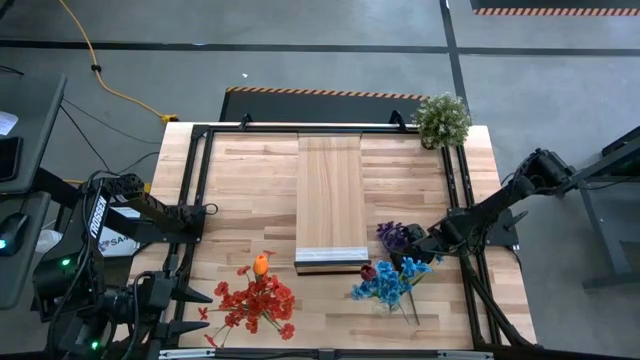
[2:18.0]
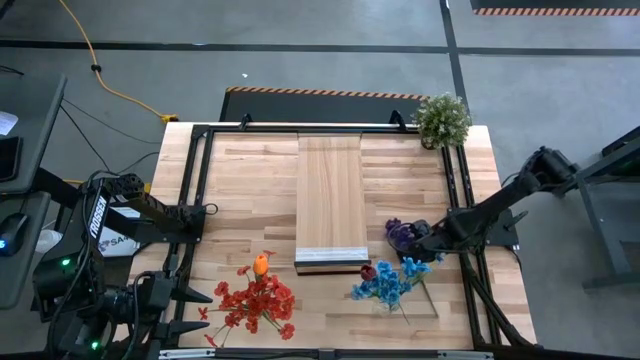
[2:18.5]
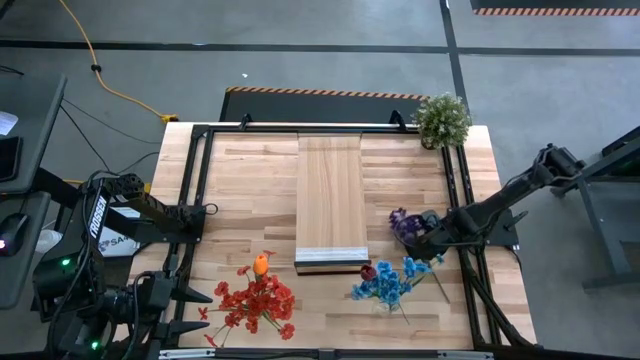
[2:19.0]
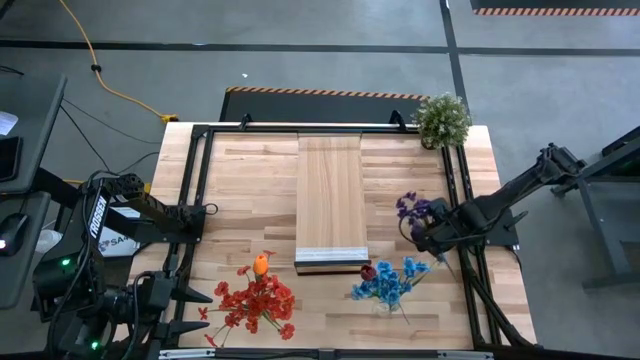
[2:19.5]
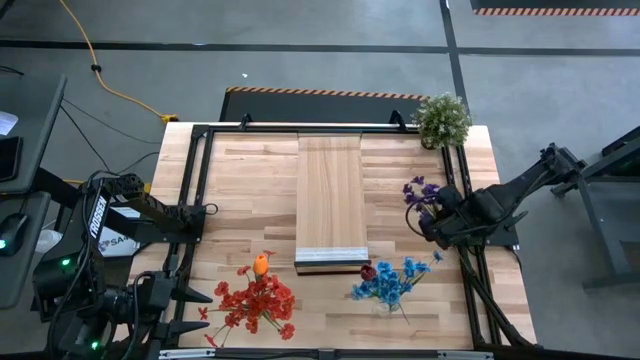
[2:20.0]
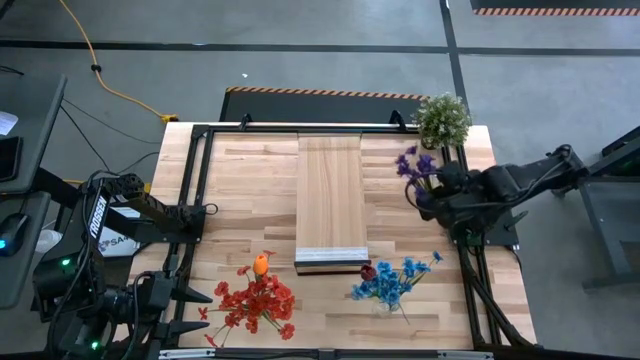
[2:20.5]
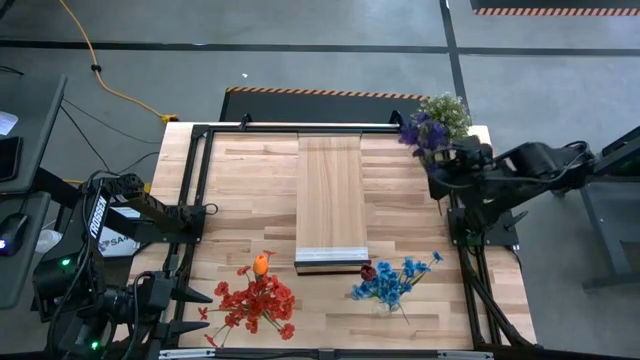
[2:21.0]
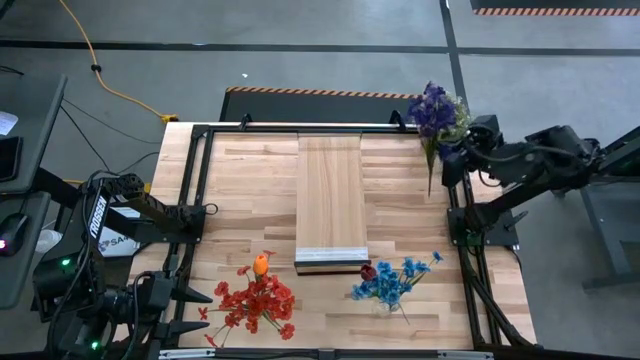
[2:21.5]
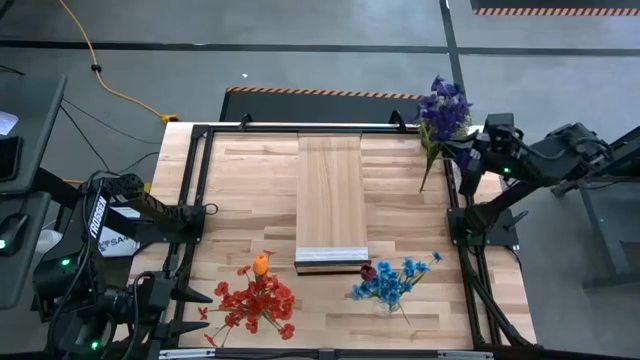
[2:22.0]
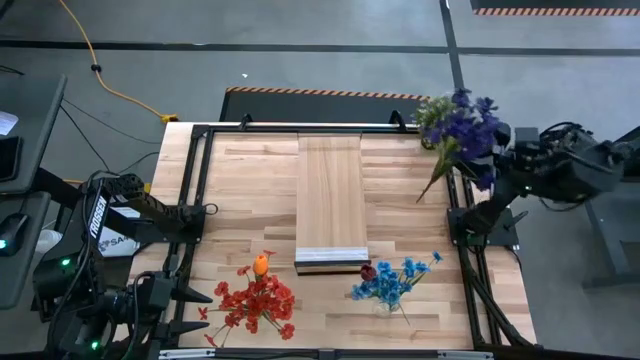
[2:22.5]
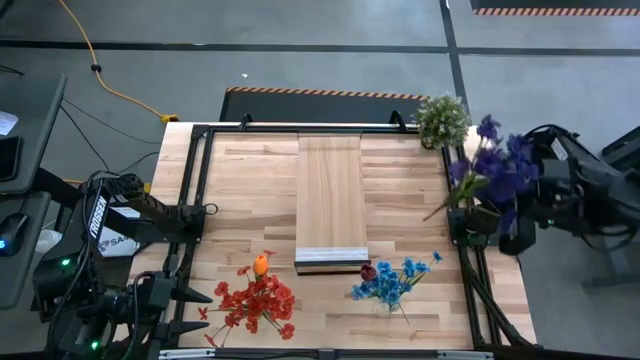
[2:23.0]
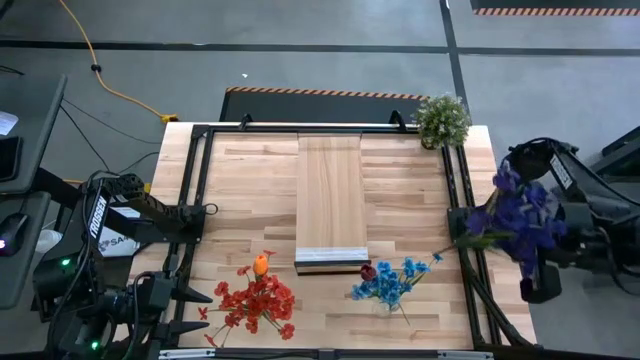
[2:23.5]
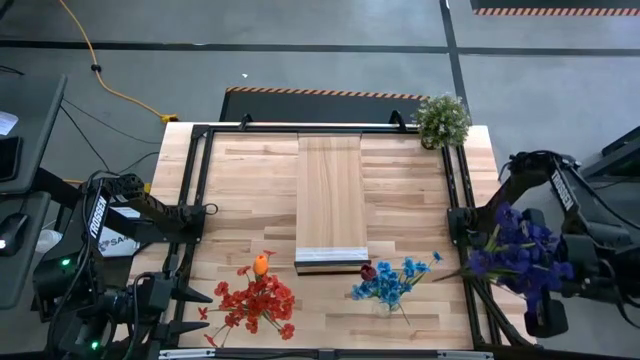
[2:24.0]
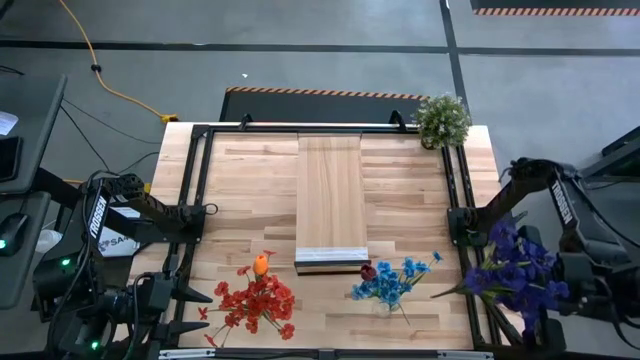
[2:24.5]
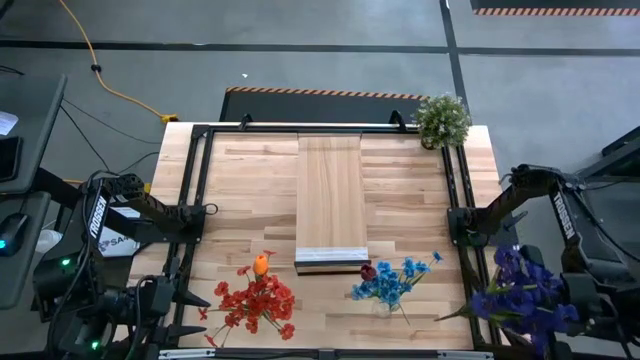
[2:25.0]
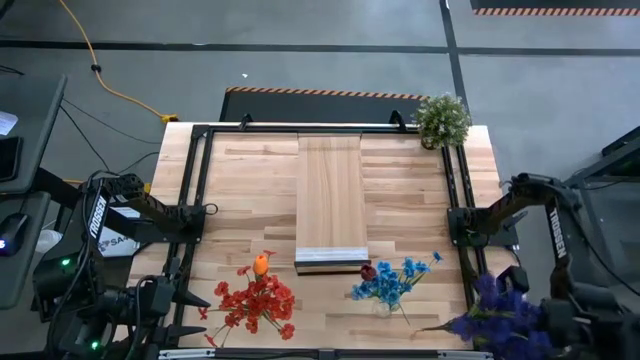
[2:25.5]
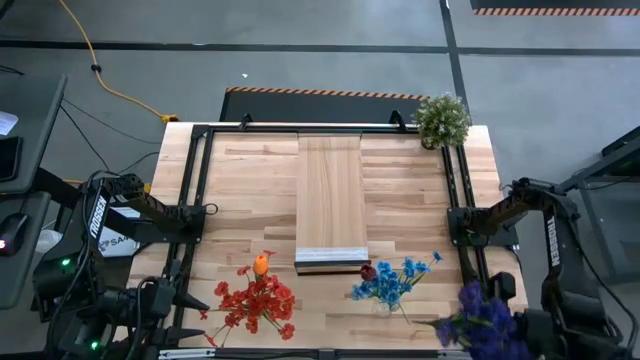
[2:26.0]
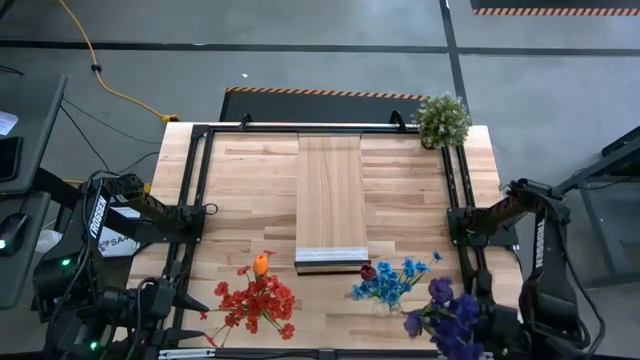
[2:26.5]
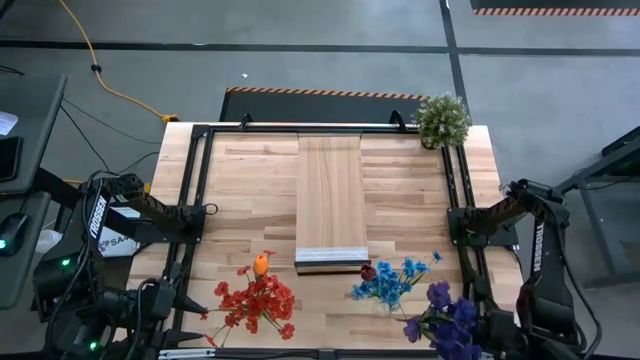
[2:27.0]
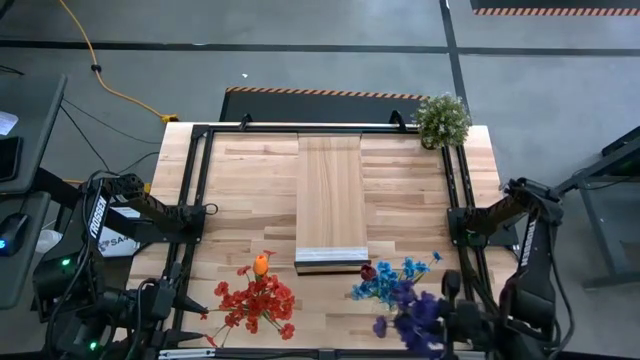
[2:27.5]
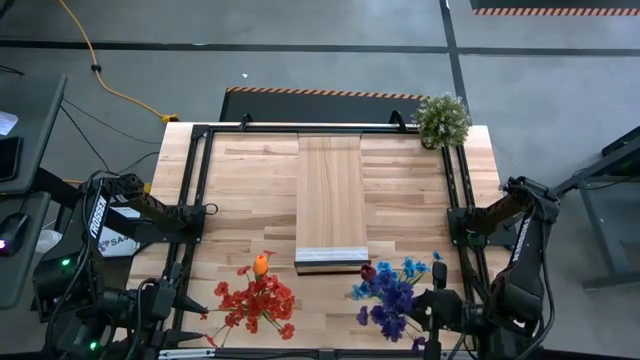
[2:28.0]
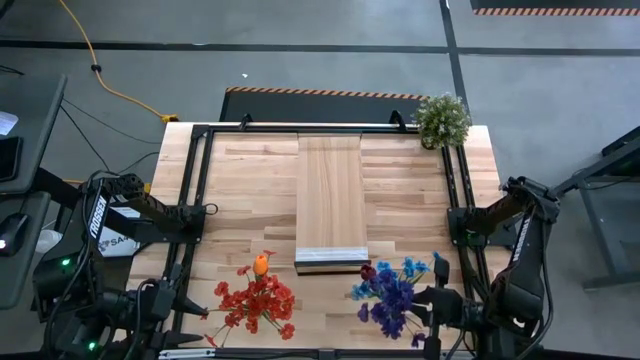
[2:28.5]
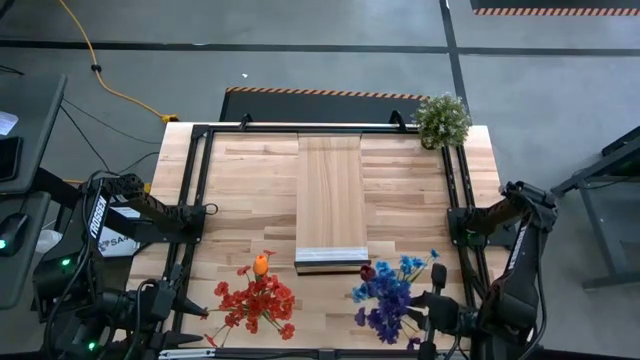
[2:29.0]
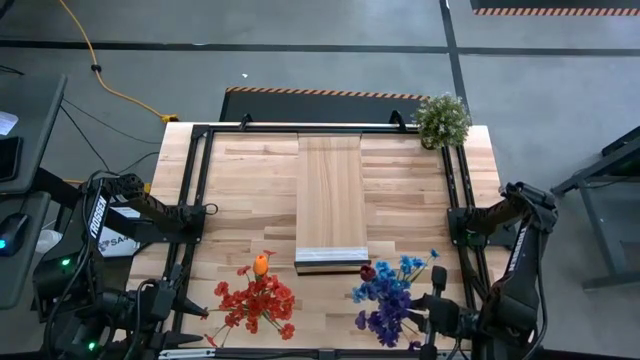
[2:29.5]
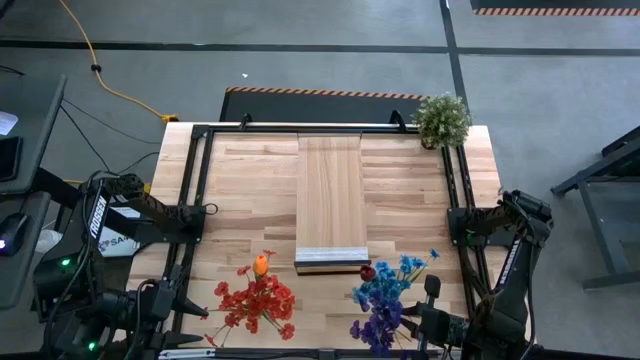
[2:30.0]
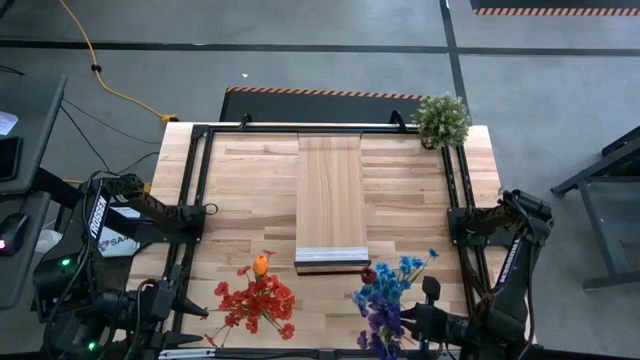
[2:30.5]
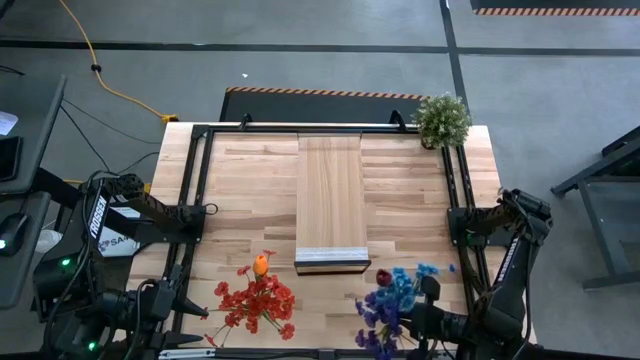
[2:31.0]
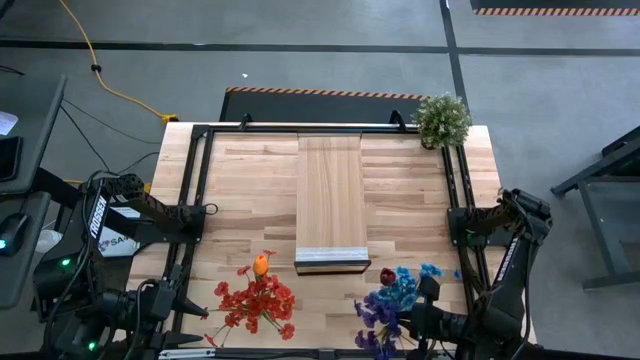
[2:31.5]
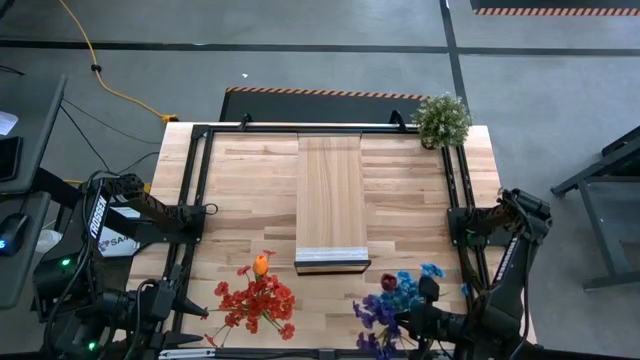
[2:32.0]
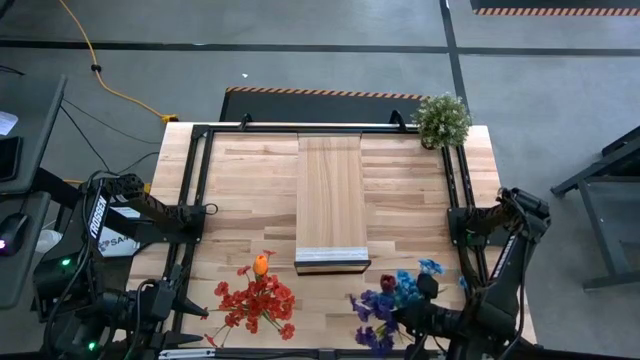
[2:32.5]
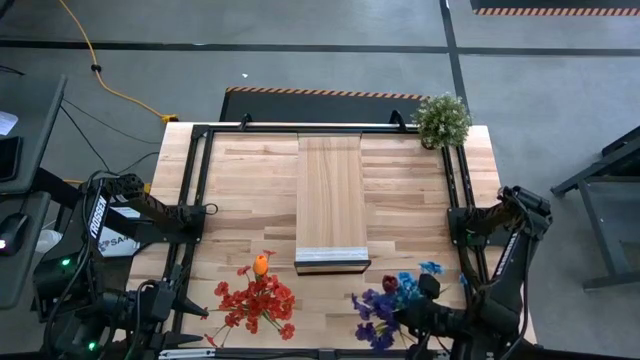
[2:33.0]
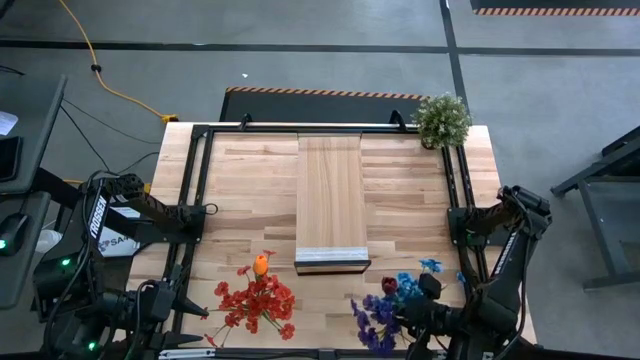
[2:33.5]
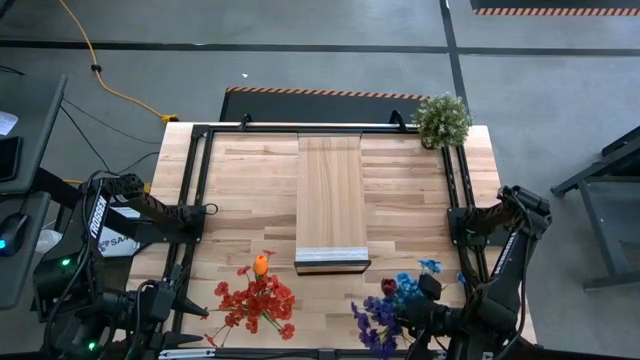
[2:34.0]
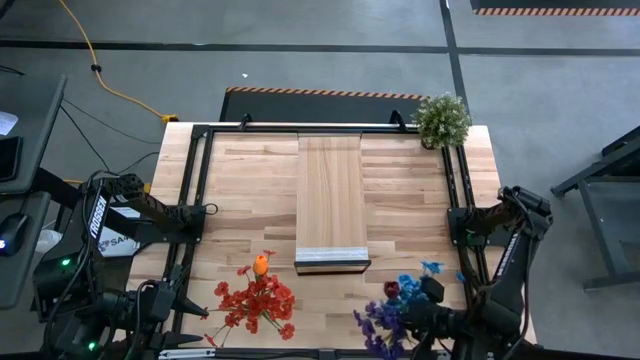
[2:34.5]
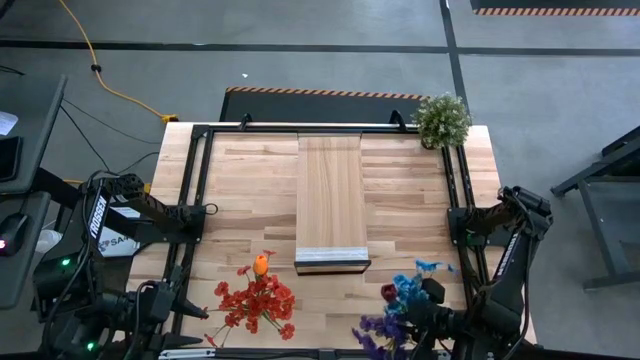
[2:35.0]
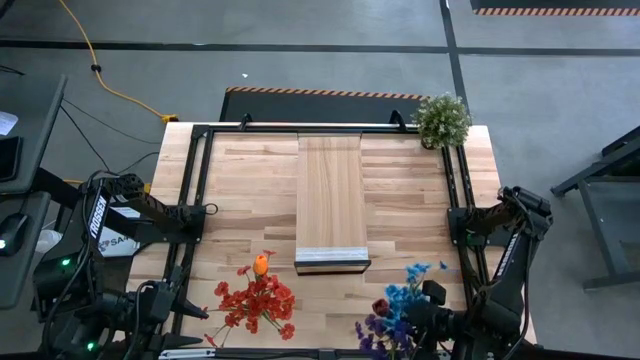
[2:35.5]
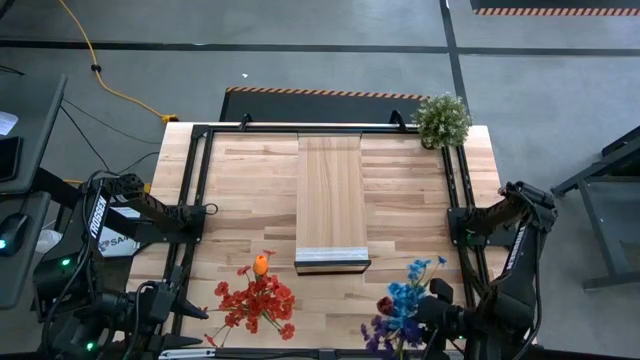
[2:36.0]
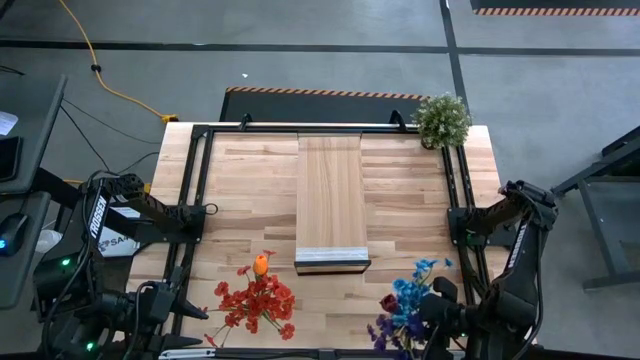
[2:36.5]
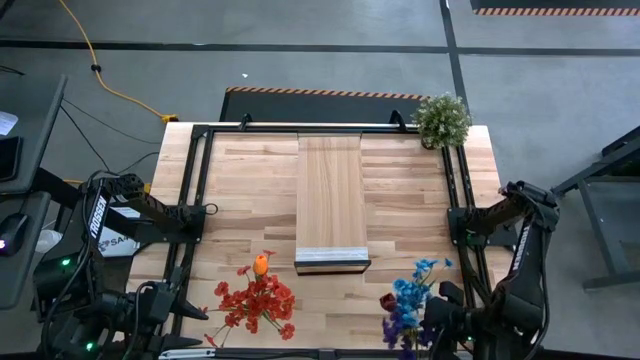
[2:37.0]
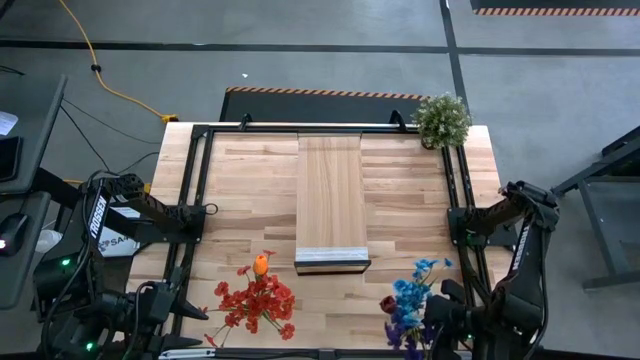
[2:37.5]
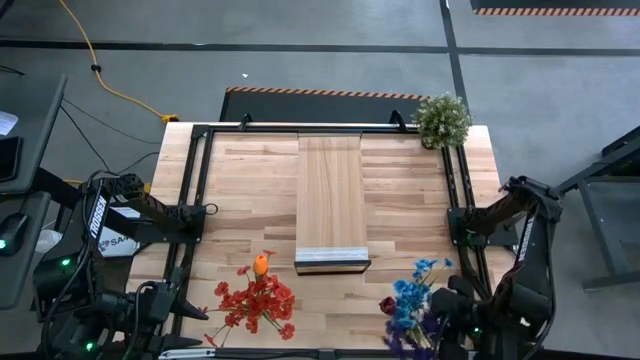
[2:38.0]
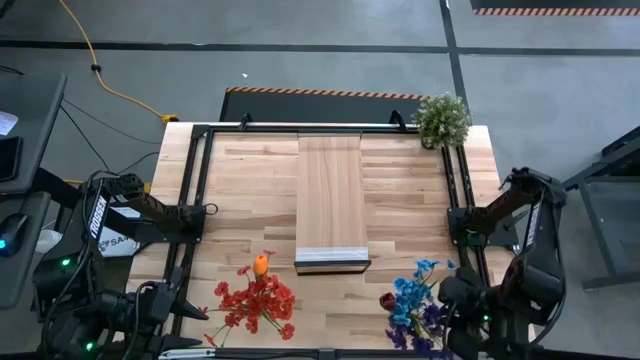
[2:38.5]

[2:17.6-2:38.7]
Task: Pick and place flowers into a vace then onto a shelf
Put the violet flowers into the right transparent vase

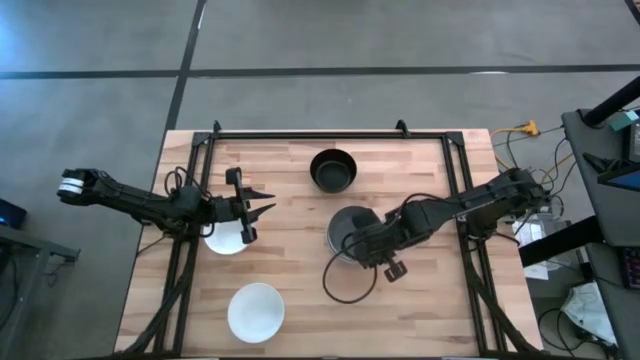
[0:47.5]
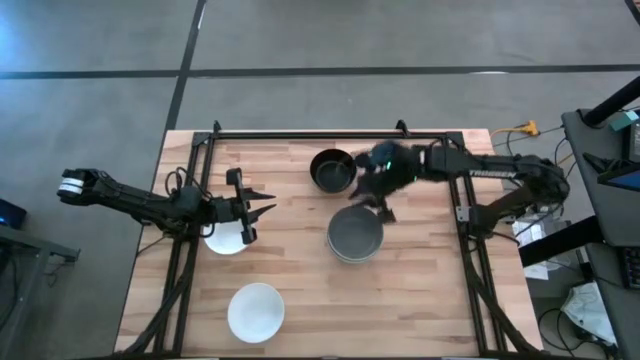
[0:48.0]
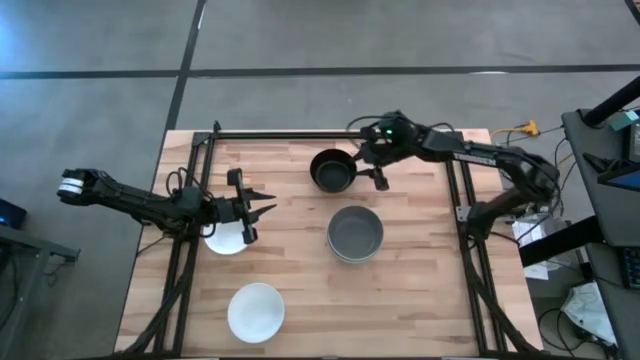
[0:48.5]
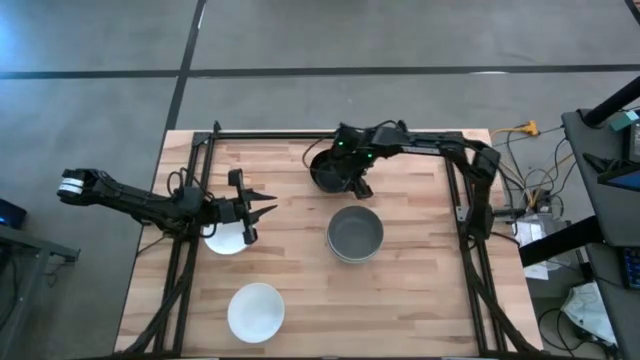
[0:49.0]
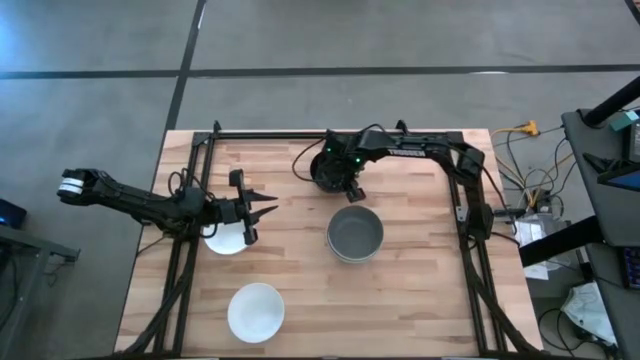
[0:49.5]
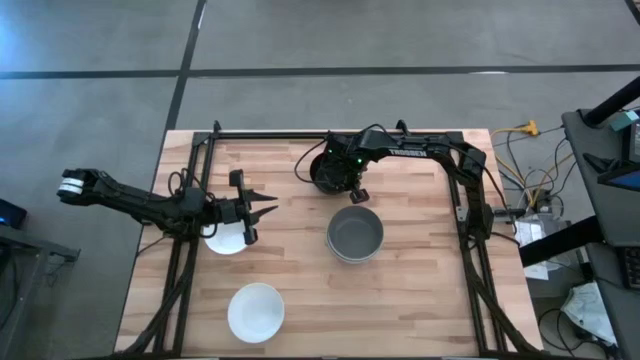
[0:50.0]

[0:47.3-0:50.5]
Task: Nest bowls inside each other
Stack the black bowl on top of the green bowl
